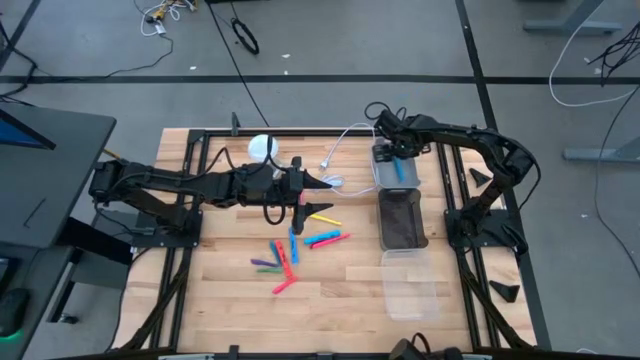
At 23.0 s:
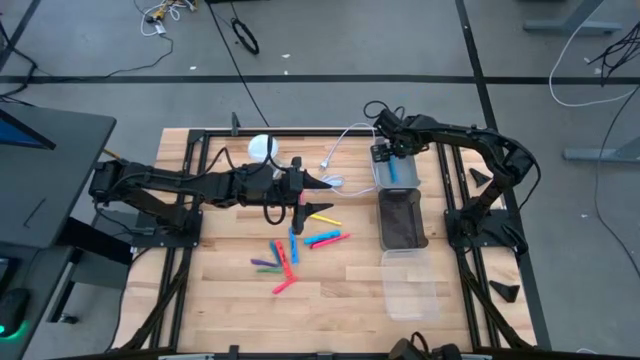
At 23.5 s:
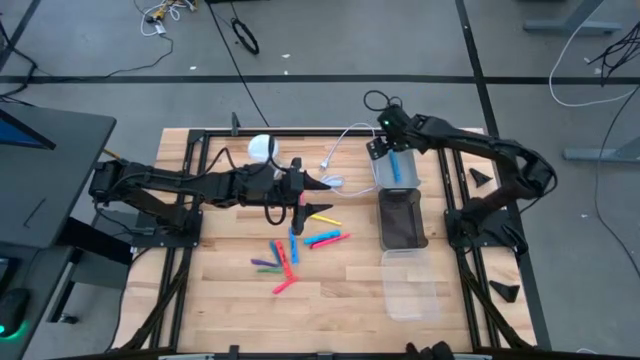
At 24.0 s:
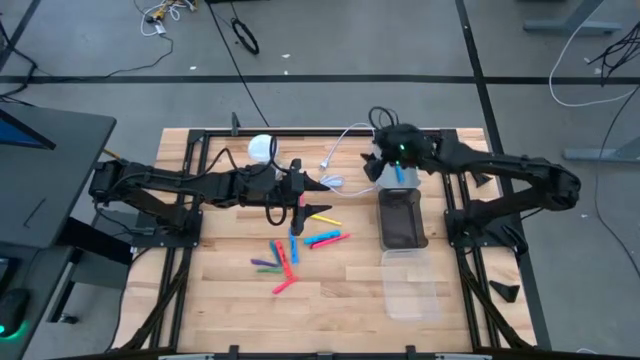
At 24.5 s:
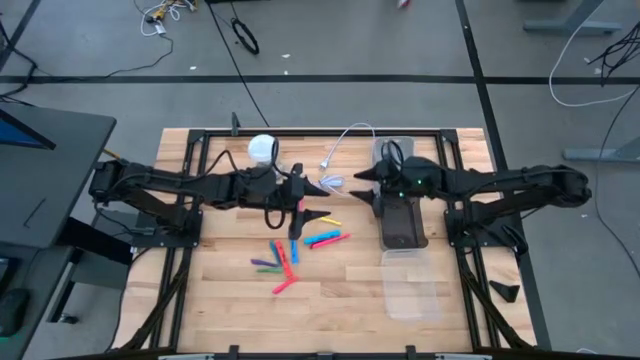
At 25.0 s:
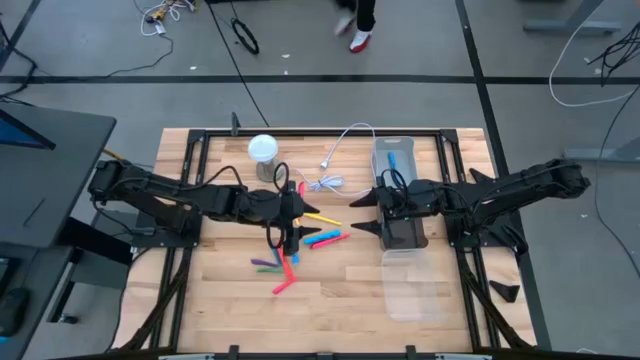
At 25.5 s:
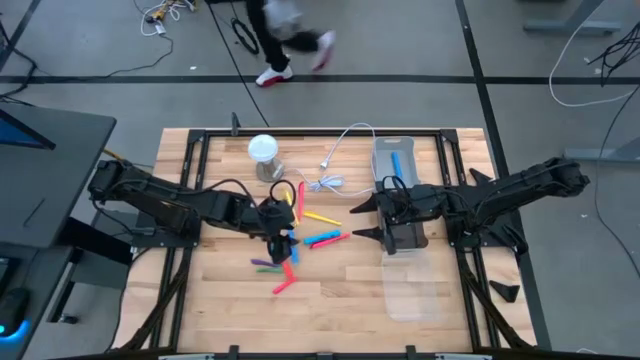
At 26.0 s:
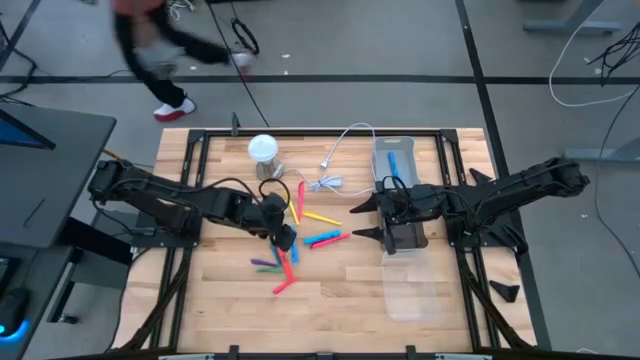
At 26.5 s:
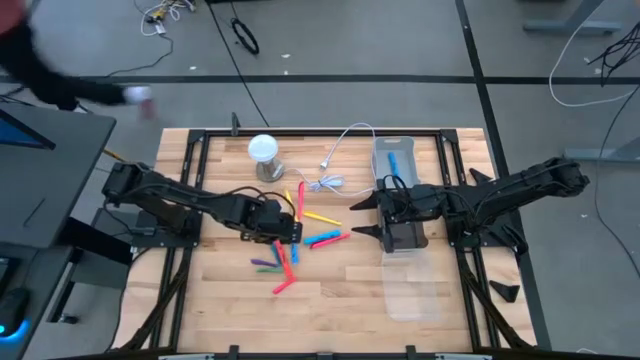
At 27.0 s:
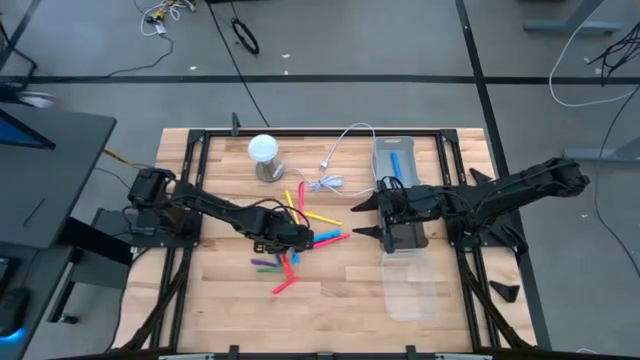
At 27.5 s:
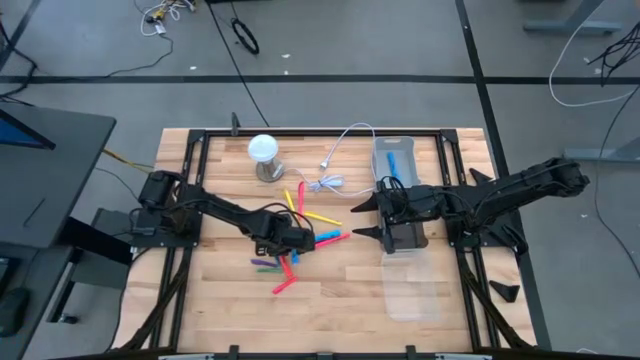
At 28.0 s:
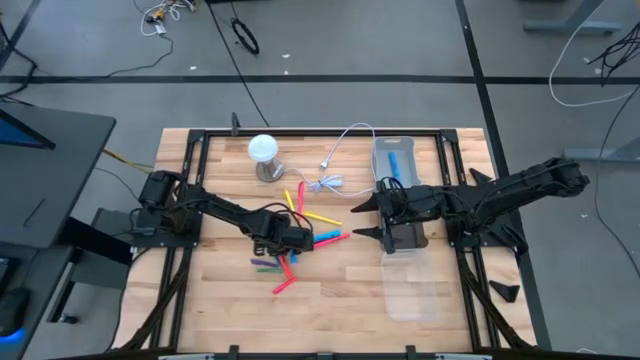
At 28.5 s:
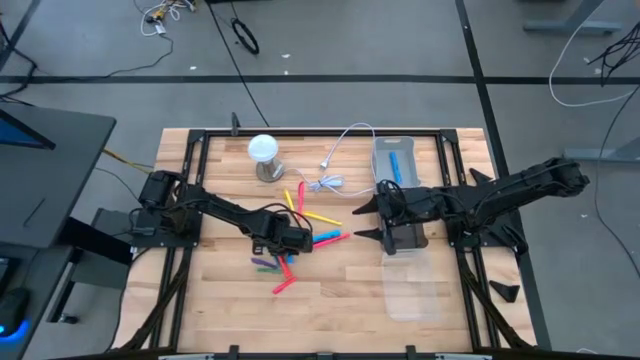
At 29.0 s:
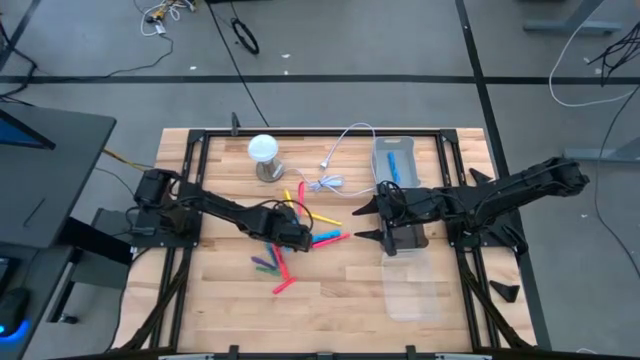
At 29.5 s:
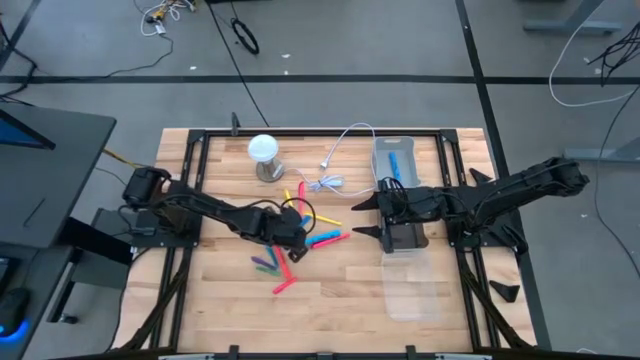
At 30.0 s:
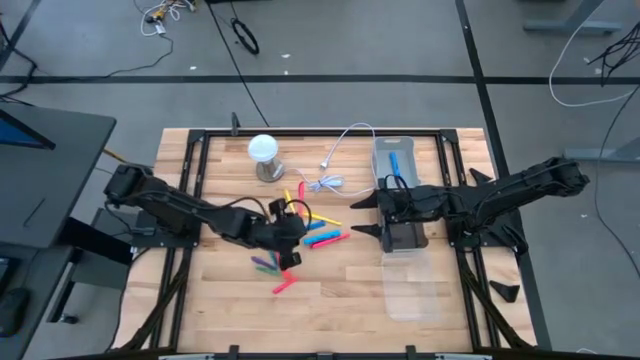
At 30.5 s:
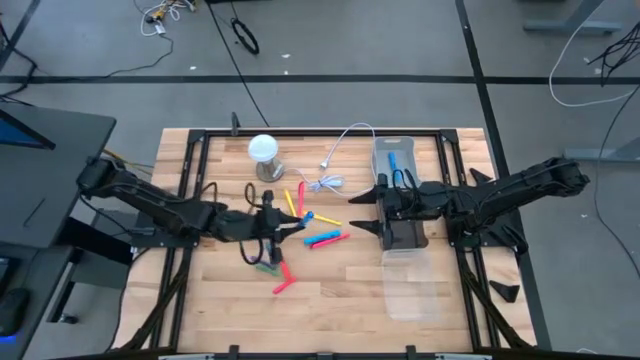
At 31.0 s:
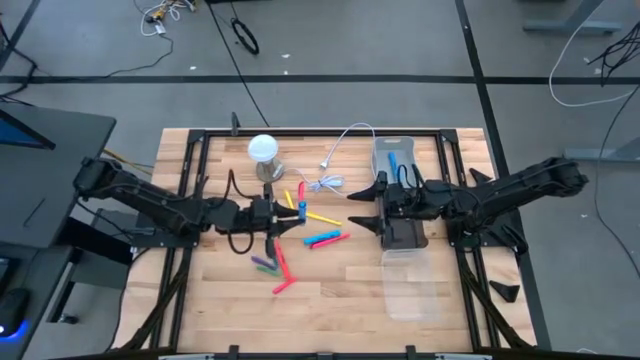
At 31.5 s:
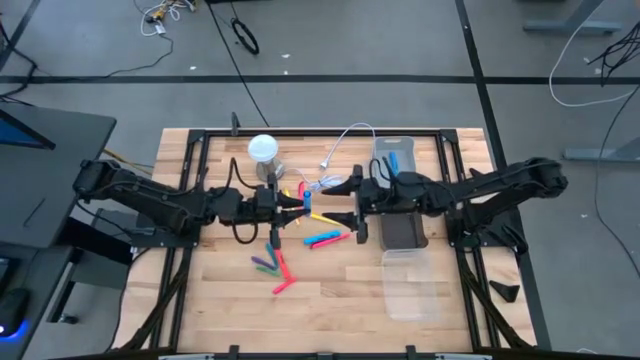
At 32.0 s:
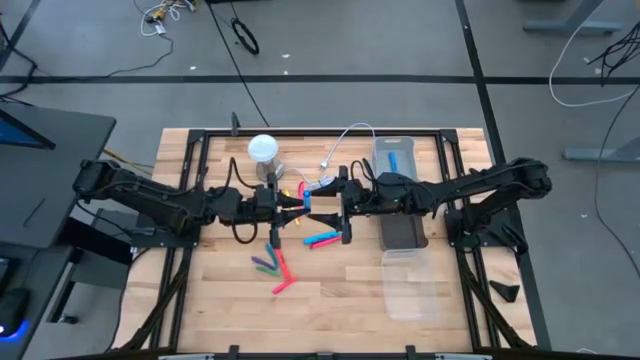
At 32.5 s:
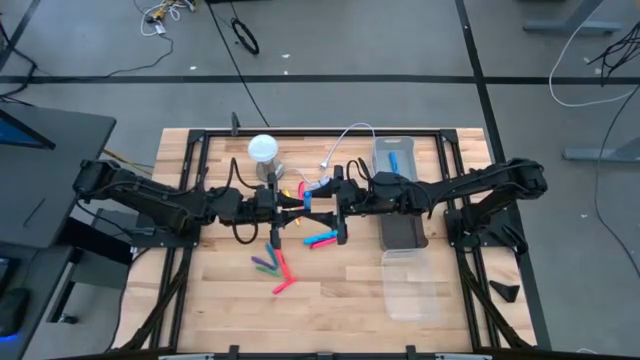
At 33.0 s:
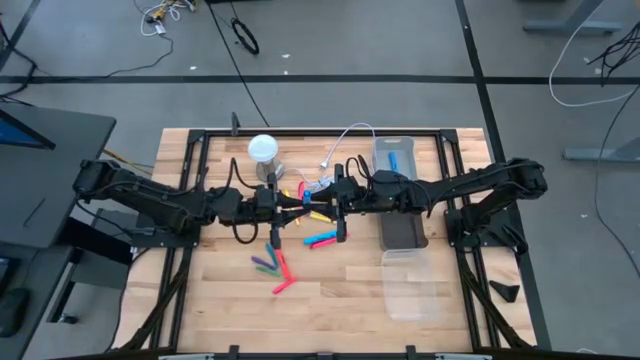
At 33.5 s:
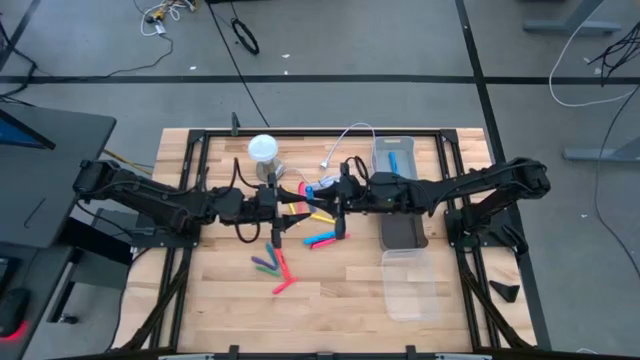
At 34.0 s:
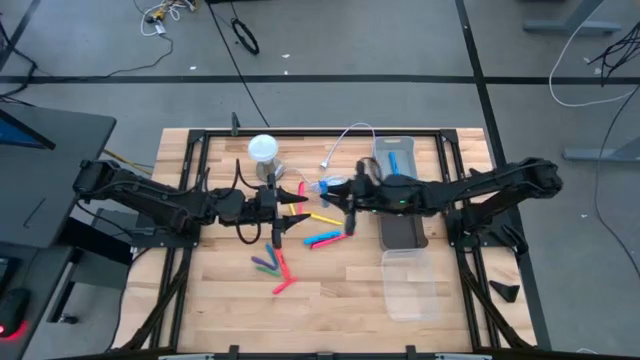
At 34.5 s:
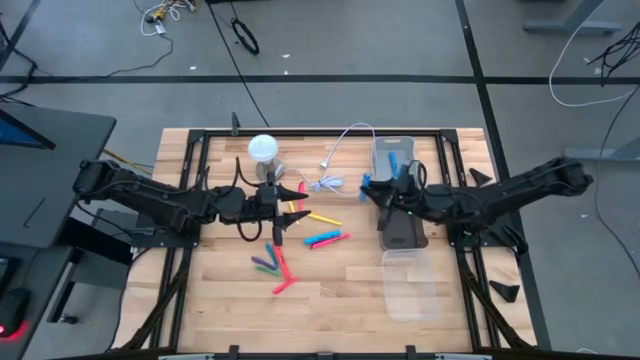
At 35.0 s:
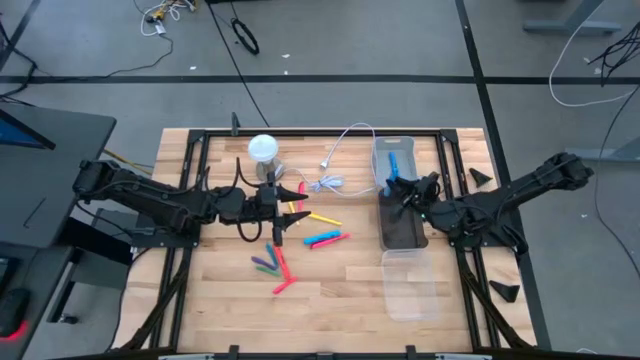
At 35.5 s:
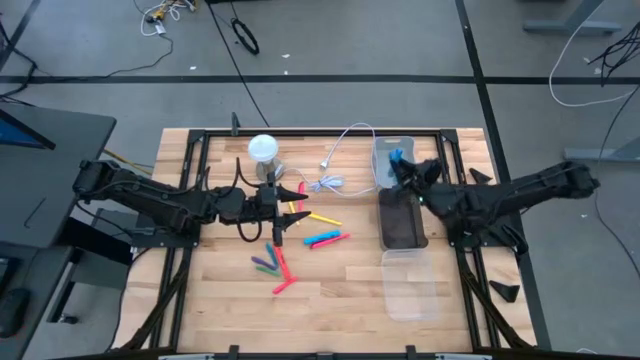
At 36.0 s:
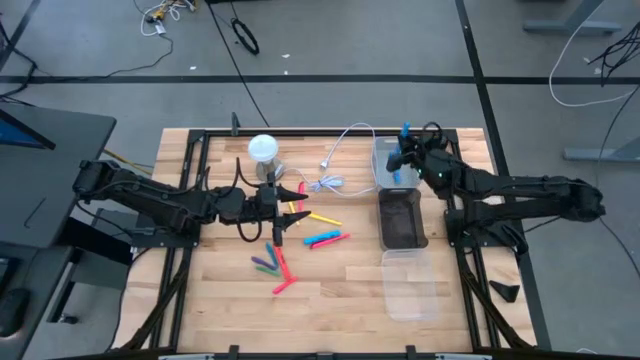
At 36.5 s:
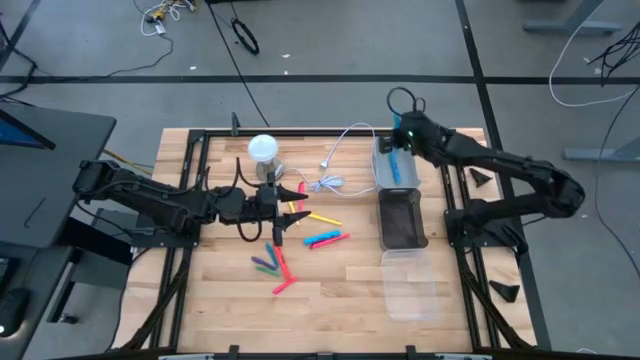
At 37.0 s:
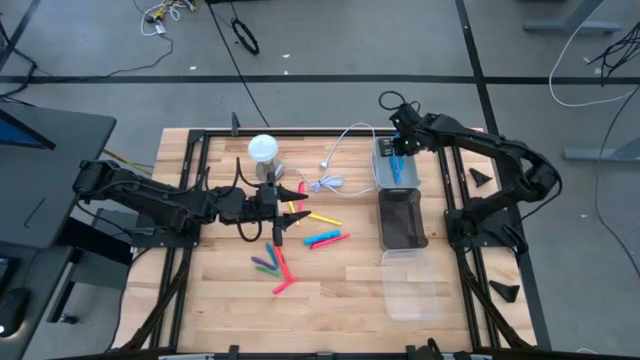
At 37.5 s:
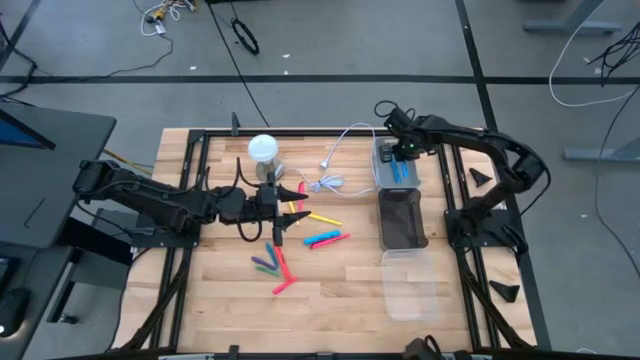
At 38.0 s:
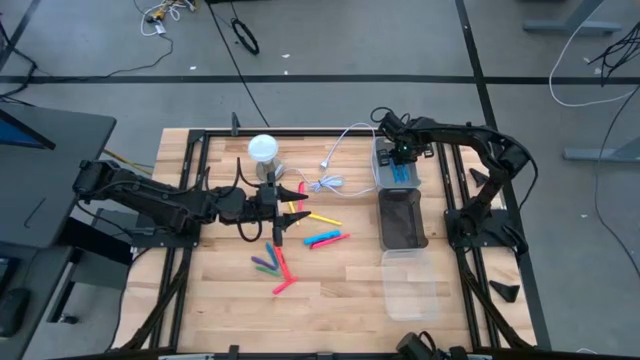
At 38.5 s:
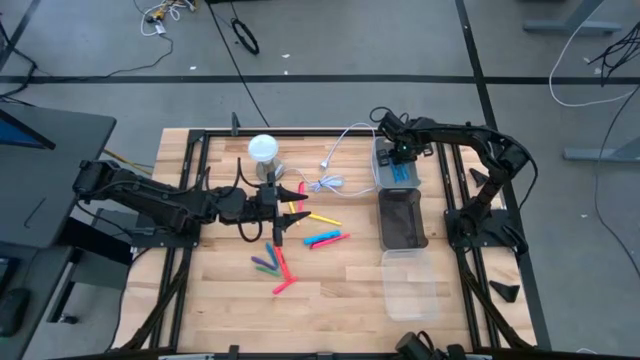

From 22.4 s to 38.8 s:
Task: Pick & Place Markers
Put the left blue highlighter into the gray bin
